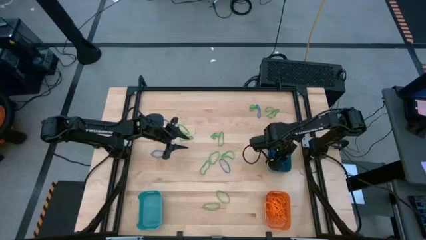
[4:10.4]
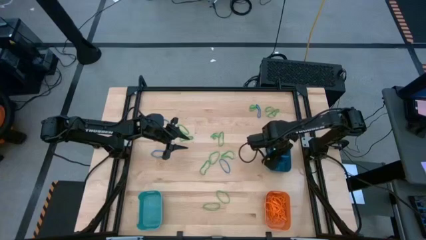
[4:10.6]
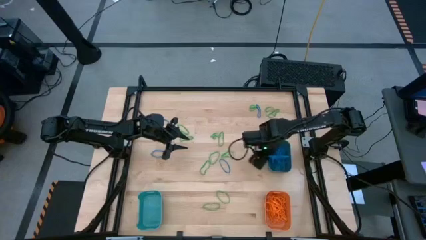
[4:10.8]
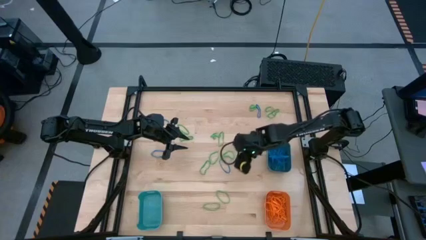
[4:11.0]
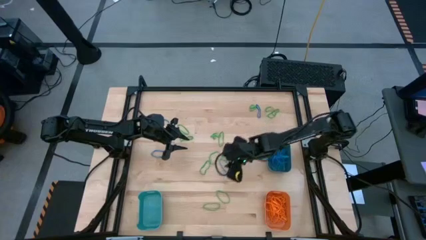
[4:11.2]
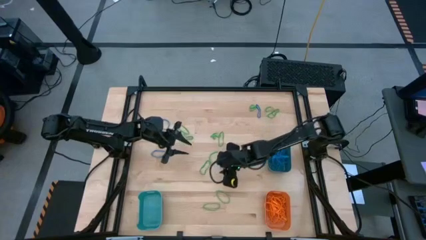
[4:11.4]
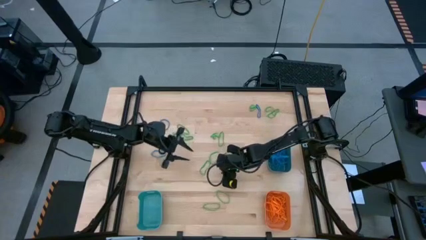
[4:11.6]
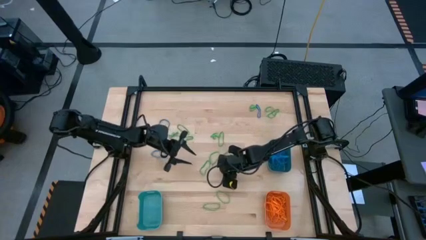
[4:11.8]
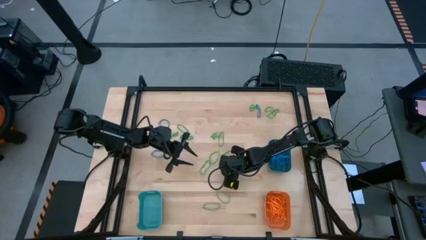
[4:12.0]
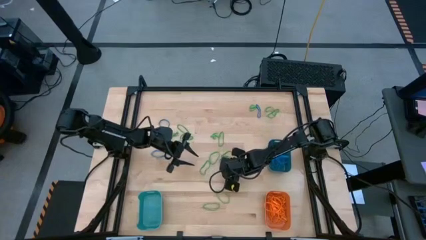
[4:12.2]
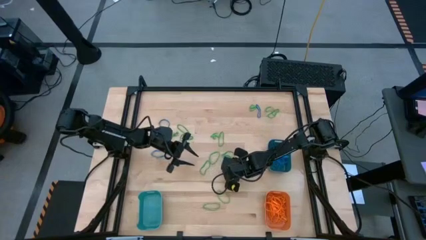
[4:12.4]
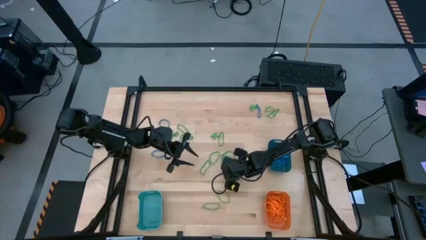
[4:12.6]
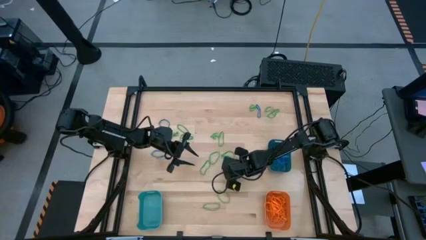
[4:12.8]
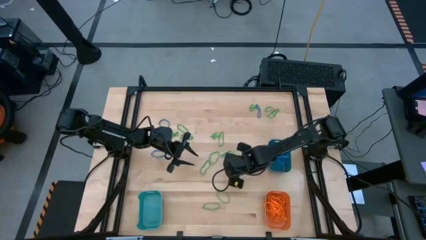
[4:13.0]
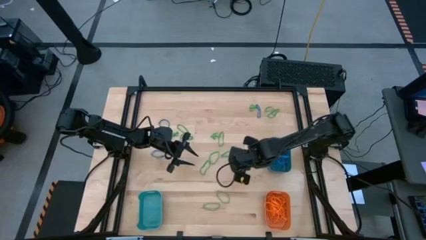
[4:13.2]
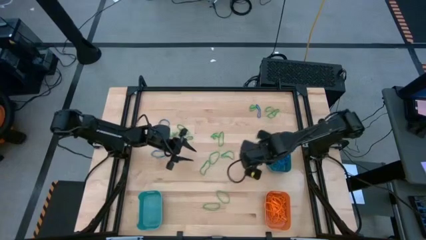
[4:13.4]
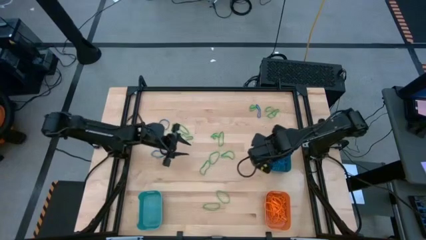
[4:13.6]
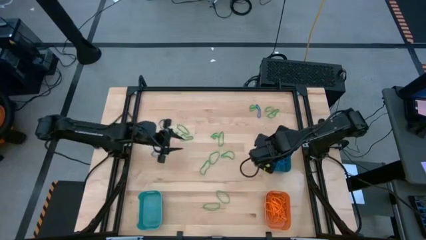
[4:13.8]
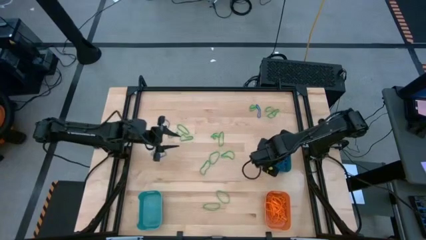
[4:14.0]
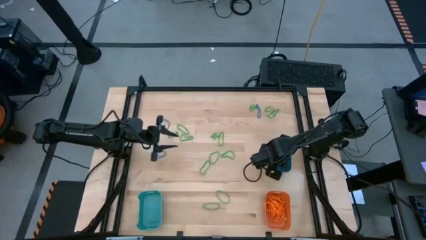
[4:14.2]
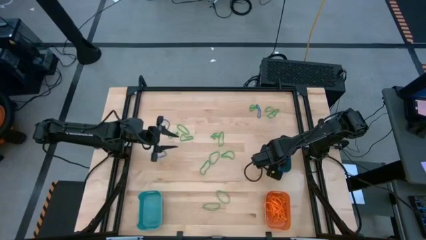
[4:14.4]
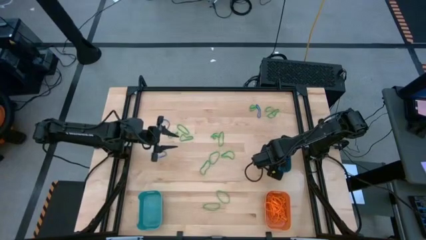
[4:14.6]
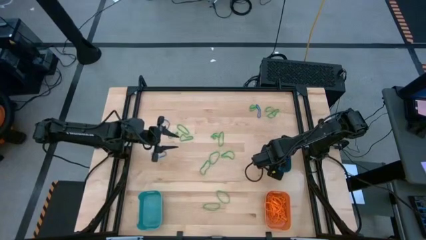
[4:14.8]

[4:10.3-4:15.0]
Task: Sort rubber bands into baskets
Put the blue rubber band into the dark blue bin

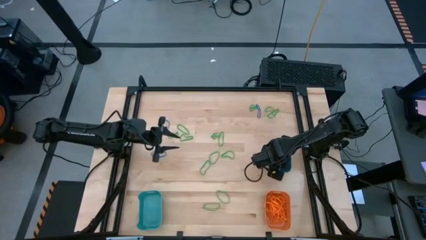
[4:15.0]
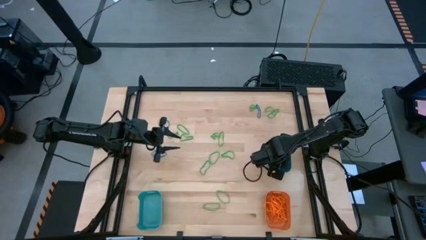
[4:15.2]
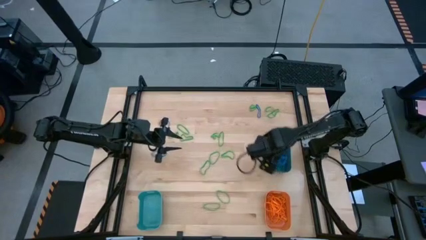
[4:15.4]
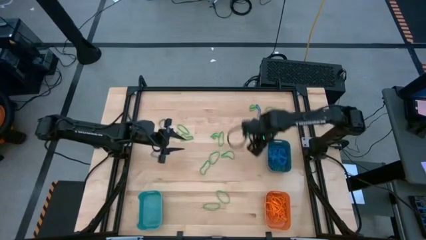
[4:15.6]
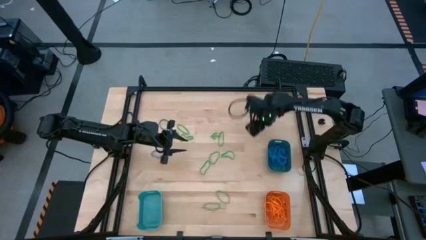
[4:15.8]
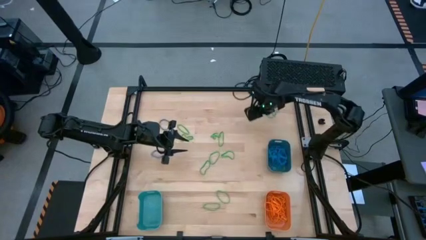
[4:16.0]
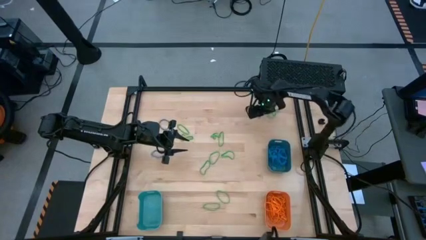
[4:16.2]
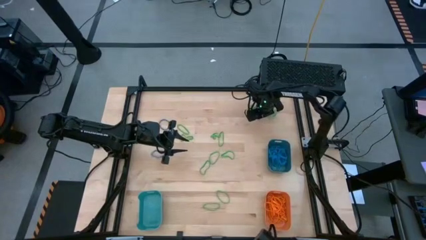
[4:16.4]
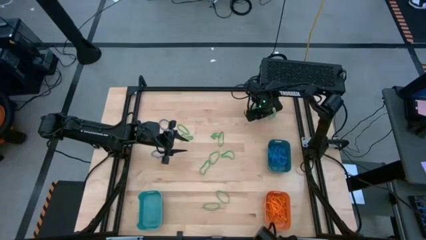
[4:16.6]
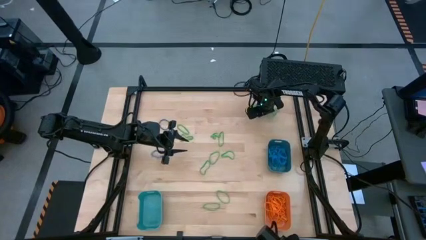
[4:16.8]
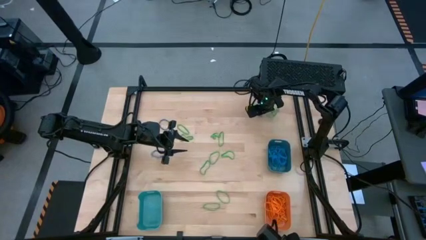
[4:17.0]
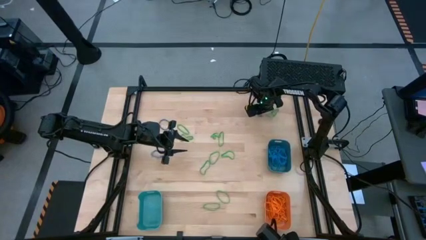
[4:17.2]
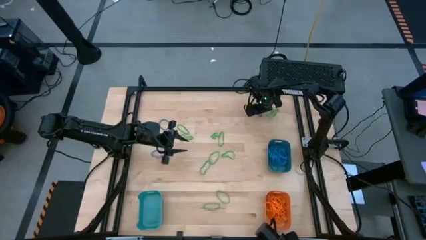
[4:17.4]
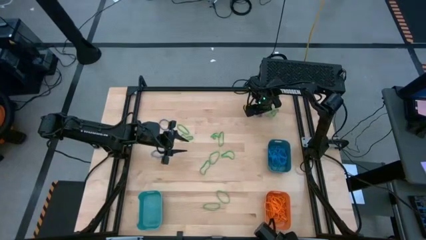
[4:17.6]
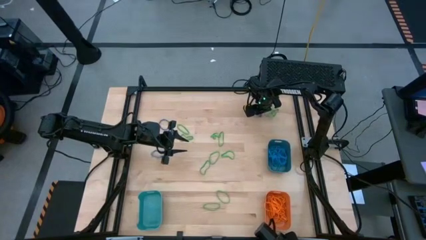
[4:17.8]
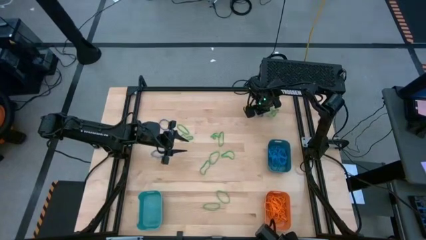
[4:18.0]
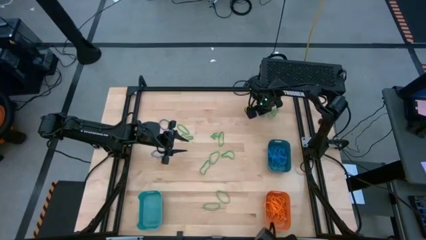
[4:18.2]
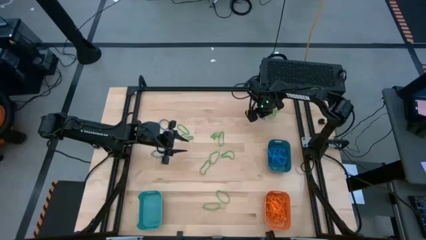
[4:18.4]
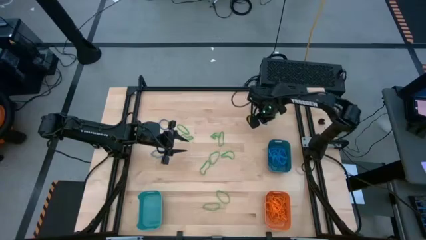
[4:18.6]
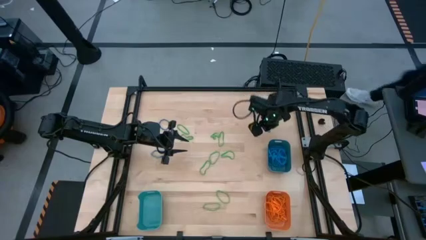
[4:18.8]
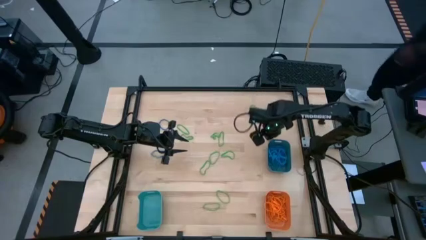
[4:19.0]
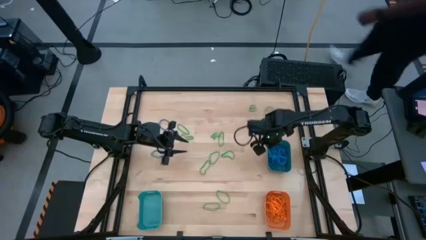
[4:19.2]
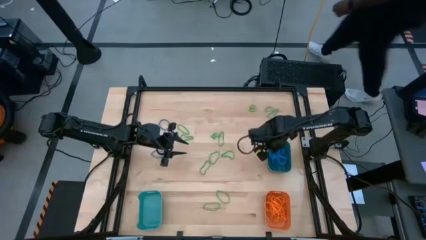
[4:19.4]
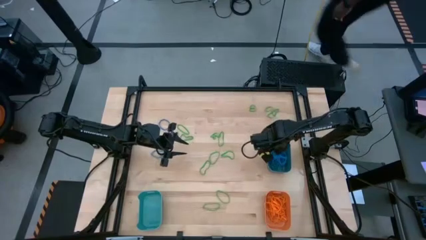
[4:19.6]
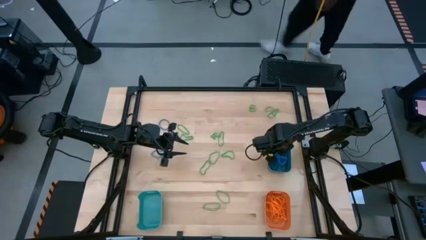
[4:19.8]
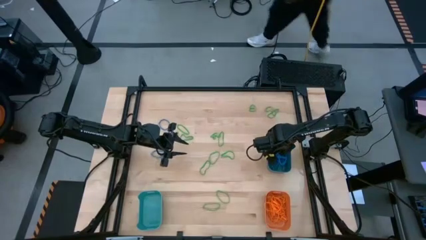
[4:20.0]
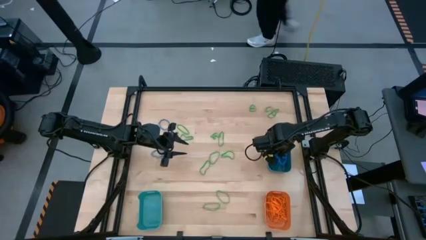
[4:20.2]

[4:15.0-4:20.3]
Put the blue rubber band into the dark blue bin

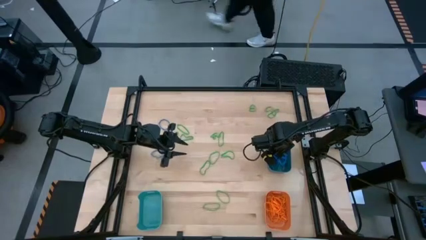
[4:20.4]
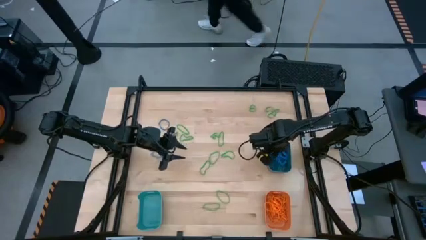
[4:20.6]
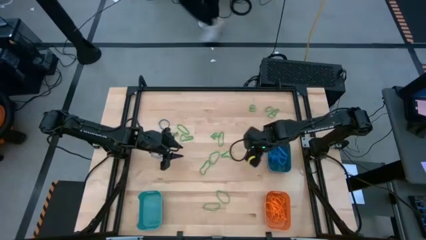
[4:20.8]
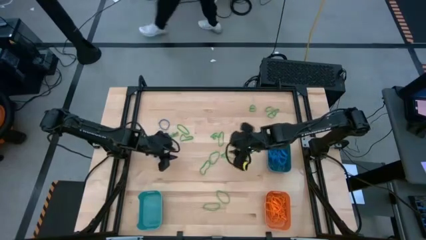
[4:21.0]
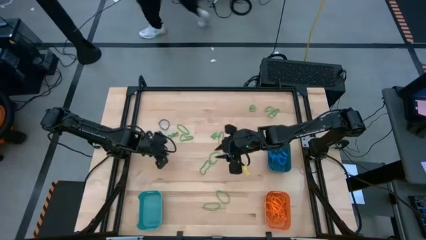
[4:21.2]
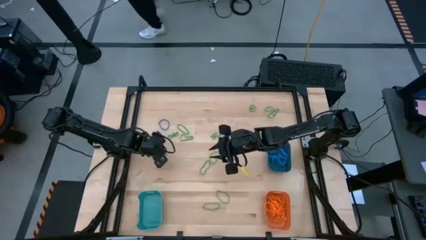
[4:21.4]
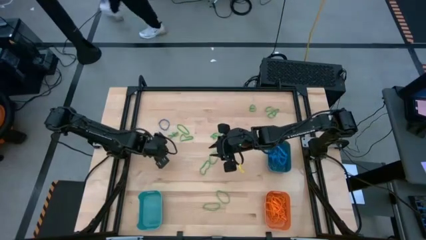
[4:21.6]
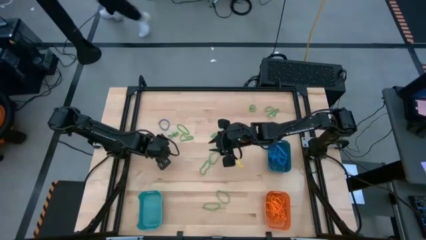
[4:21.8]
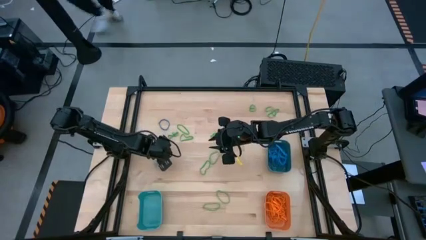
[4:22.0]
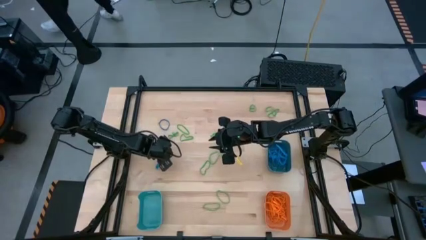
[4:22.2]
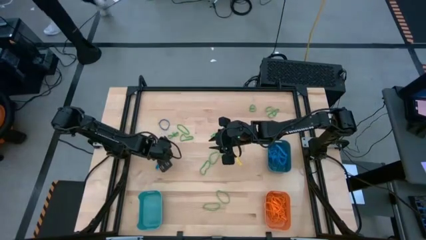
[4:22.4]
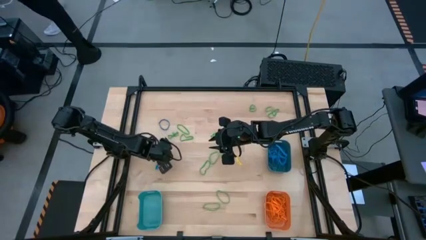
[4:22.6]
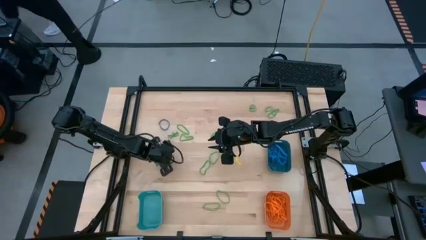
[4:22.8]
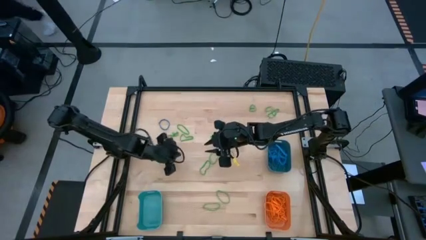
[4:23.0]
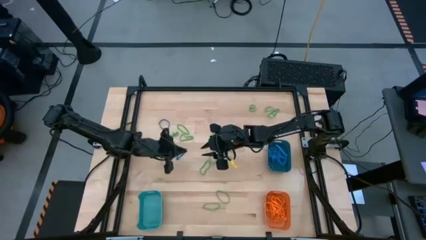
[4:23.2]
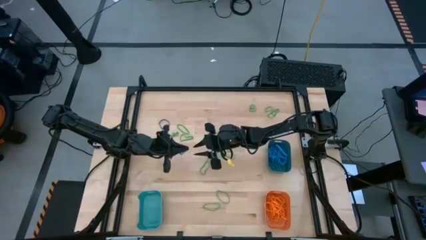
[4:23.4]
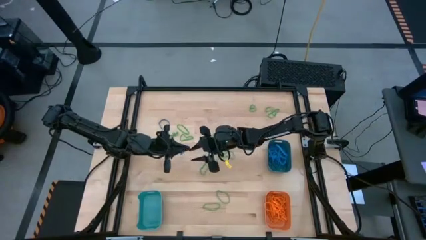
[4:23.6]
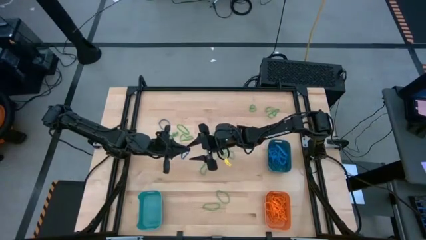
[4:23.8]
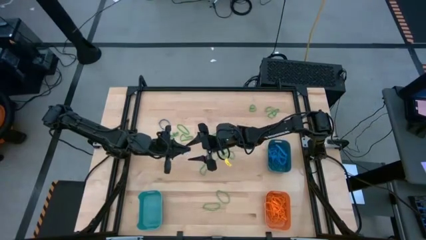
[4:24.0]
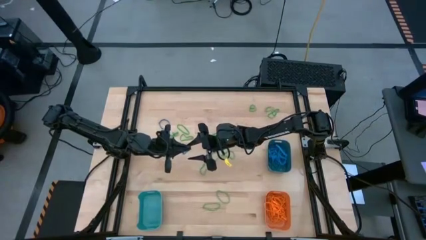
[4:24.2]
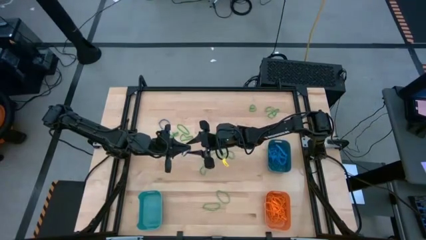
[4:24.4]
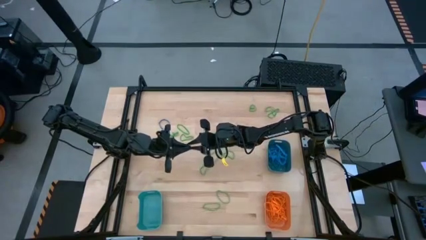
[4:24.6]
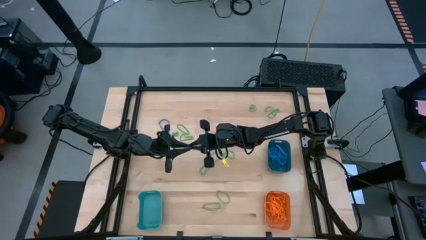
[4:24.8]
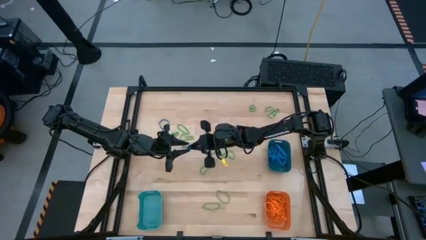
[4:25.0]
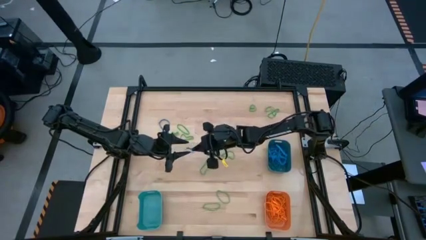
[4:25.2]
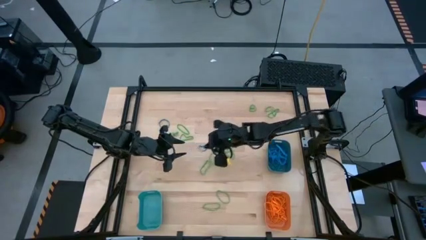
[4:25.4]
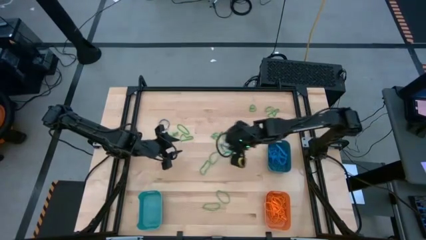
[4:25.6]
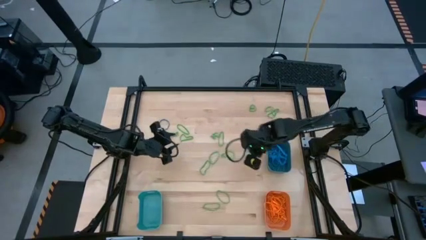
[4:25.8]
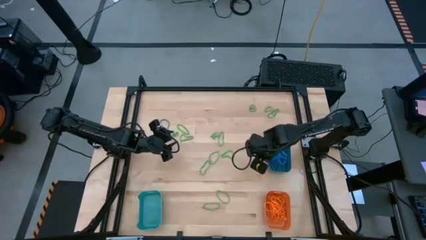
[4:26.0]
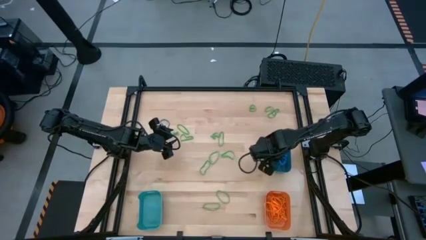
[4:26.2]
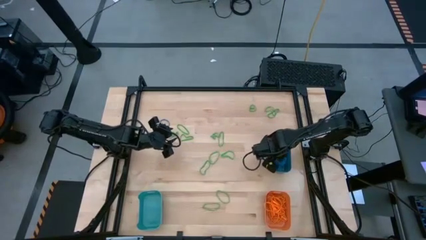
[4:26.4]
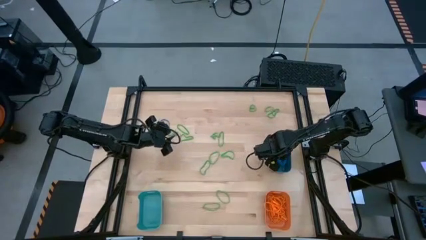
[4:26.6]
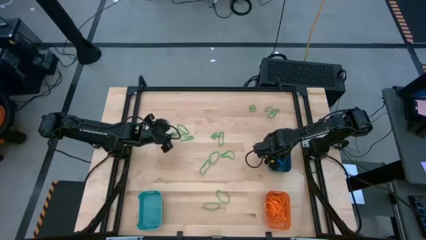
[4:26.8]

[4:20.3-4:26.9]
Put the blue rubber band into the dark blue bin

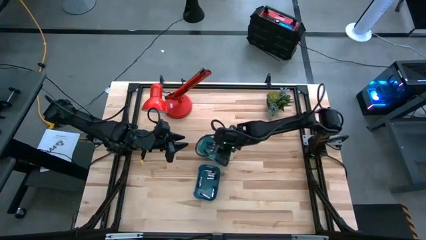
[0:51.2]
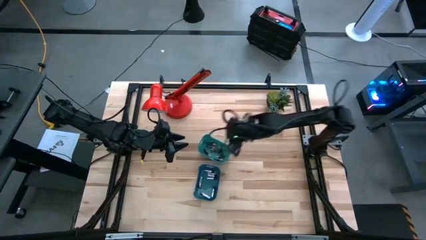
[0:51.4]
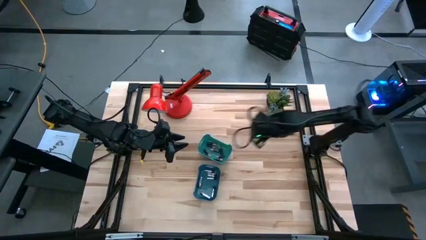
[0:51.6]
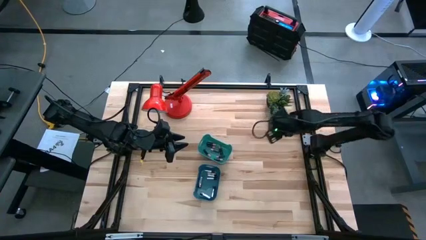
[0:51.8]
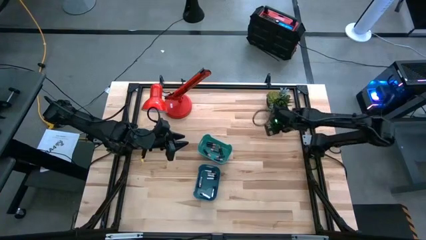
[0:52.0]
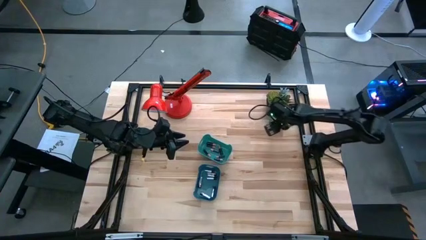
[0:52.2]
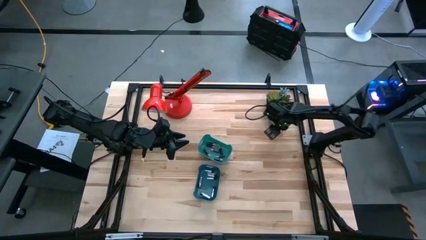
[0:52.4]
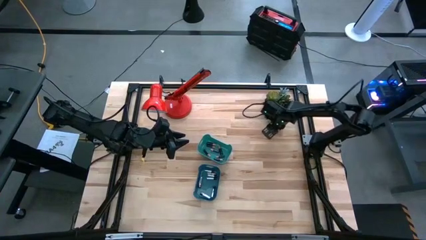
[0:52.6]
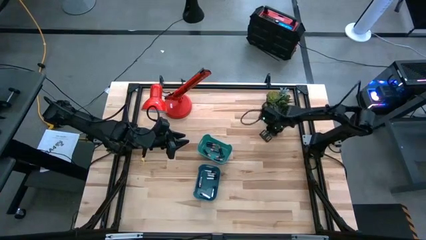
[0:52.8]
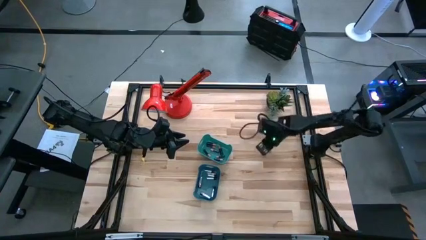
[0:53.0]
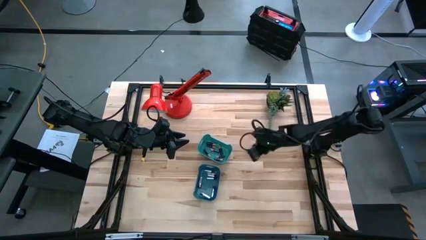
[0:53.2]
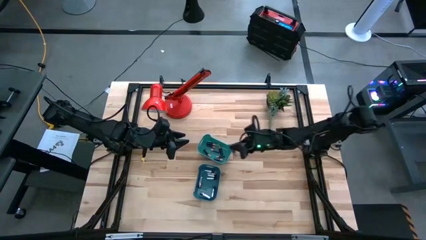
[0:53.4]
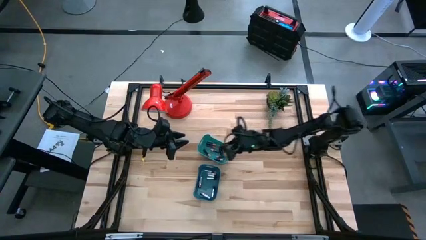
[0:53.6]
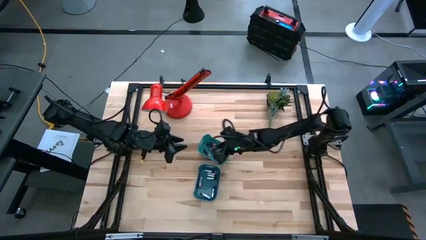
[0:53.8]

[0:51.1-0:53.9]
Task: Sort batteries
Put the black battery into the light blue bin
